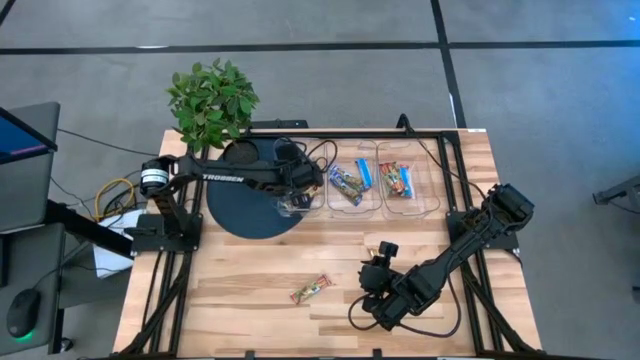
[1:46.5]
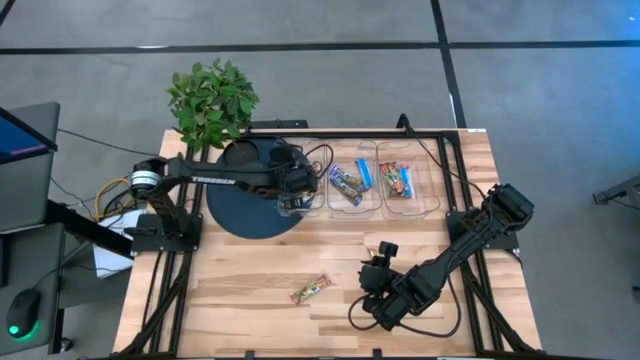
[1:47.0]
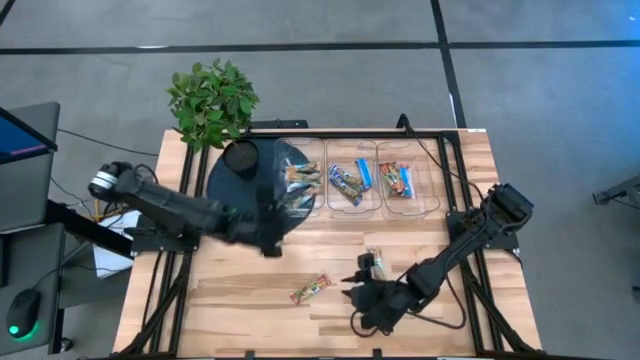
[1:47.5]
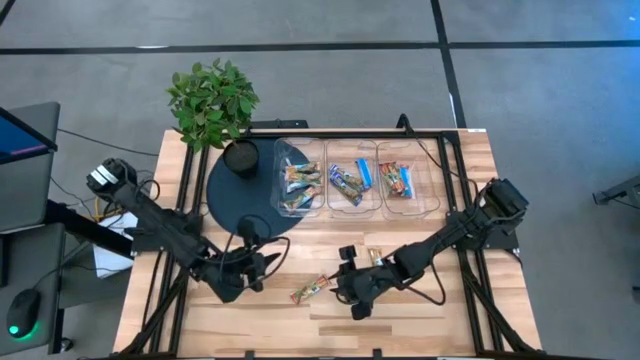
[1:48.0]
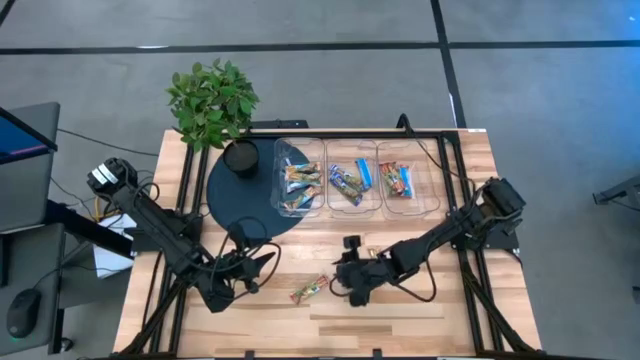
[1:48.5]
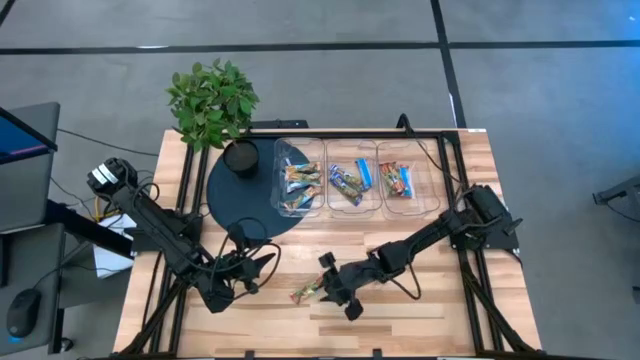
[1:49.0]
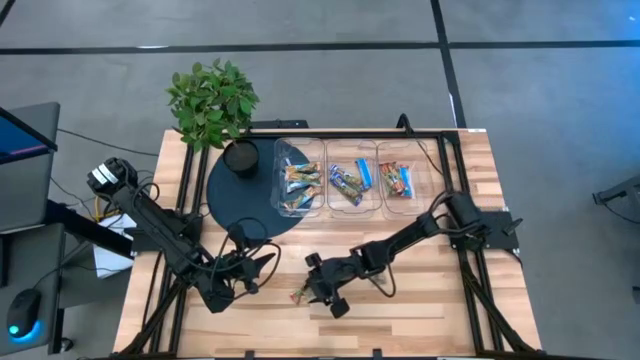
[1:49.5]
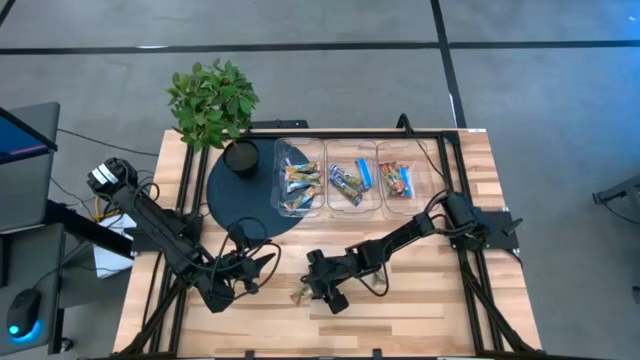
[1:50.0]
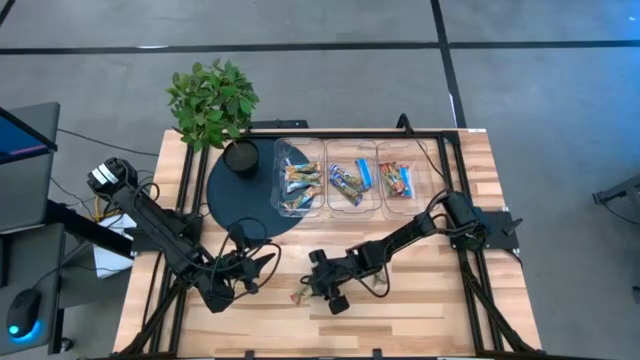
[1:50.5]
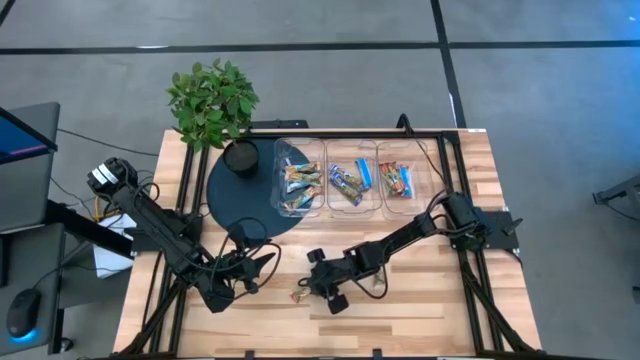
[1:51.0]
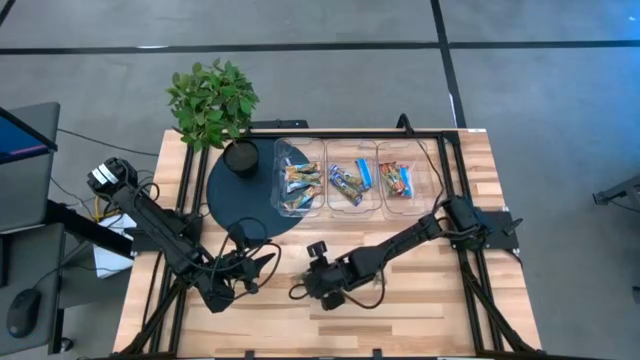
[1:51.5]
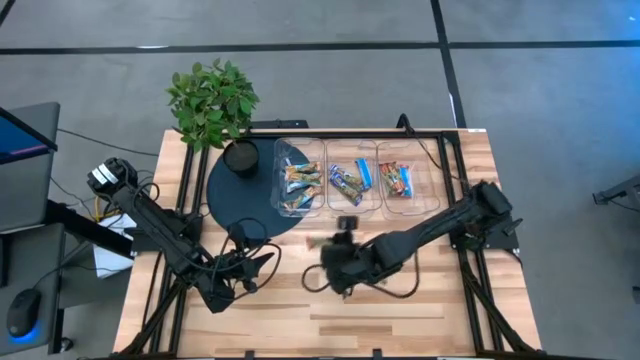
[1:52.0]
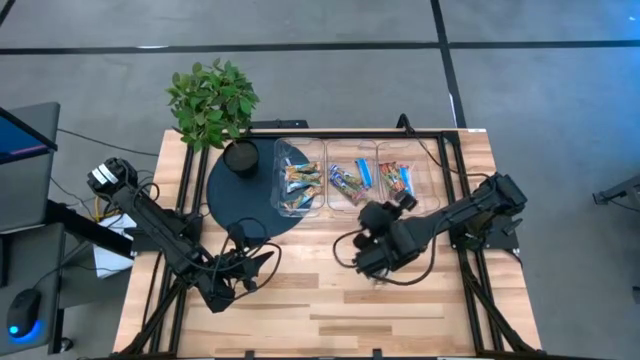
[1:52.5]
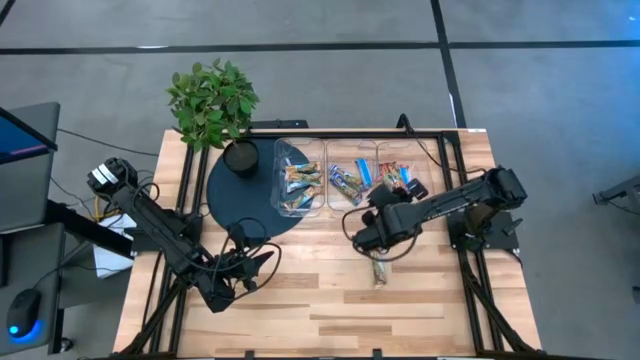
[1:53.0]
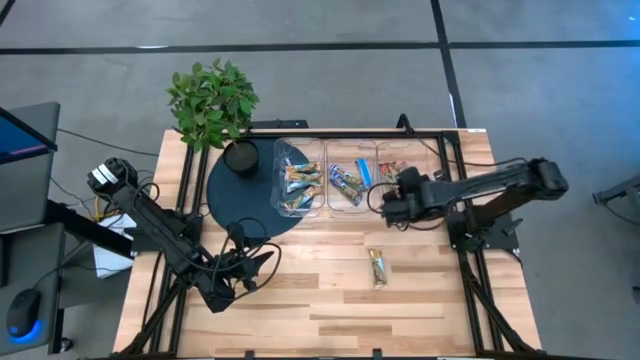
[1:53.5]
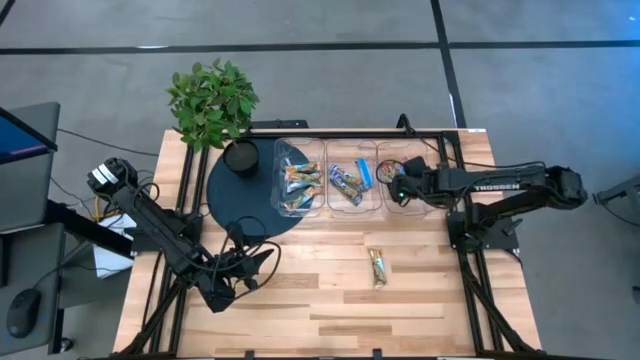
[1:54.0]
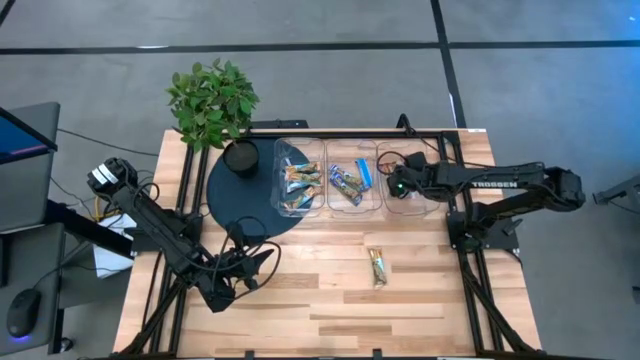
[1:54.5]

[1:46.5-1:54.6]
Task: Pick and place Granola Bars by type
Put the red granola bar into the right transparent bin

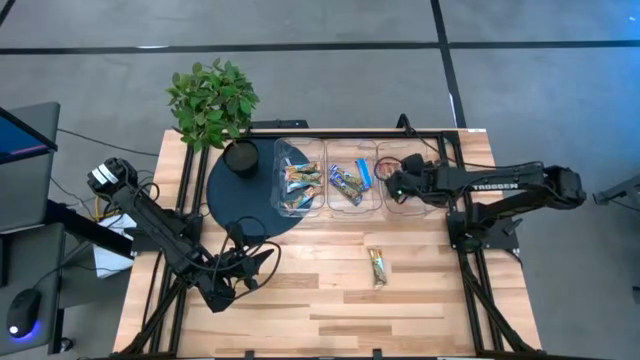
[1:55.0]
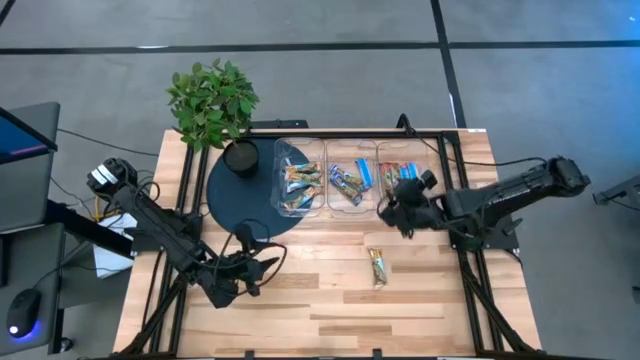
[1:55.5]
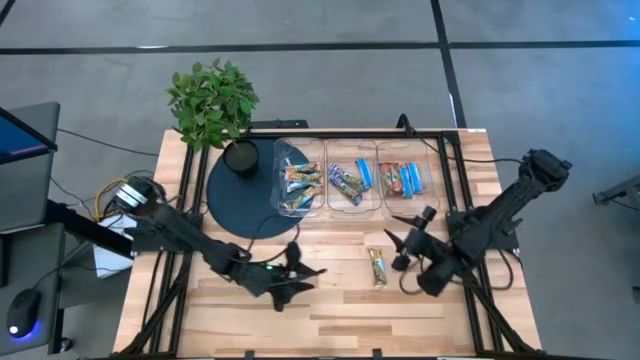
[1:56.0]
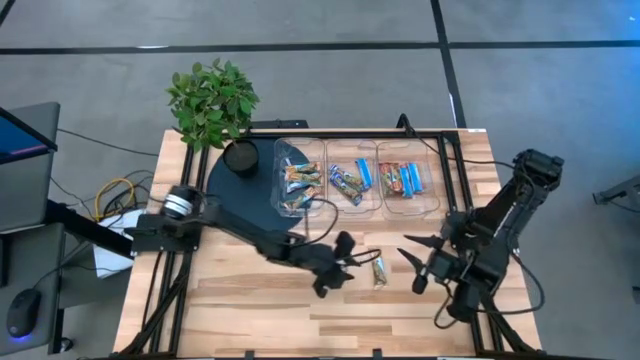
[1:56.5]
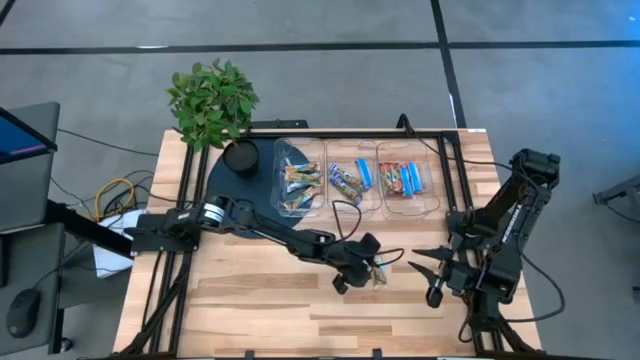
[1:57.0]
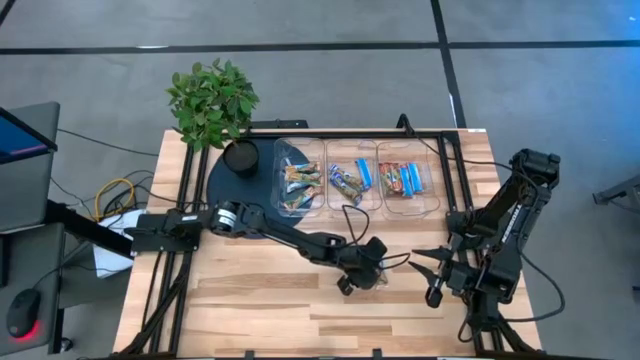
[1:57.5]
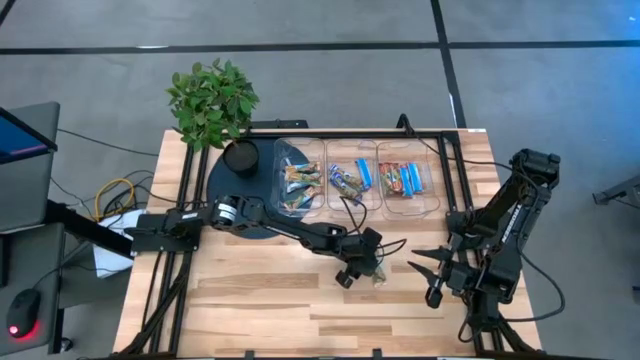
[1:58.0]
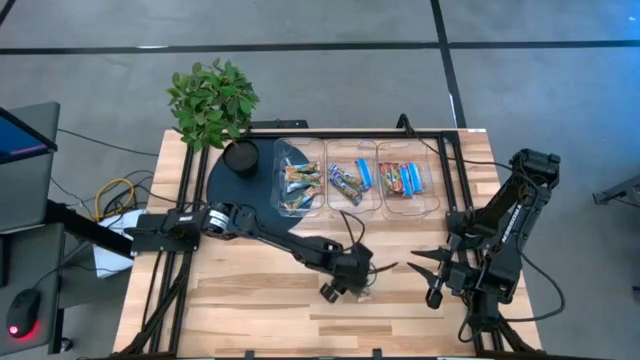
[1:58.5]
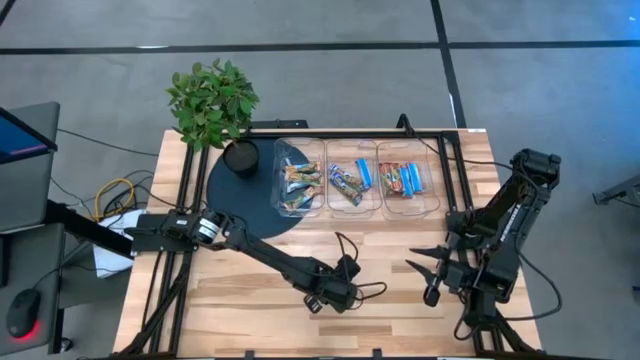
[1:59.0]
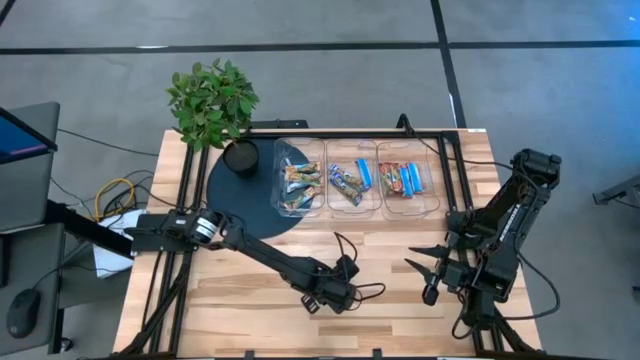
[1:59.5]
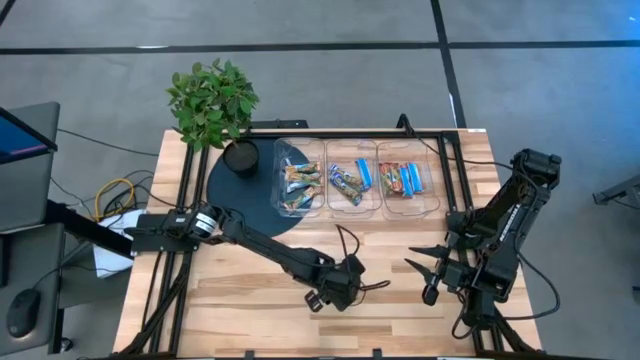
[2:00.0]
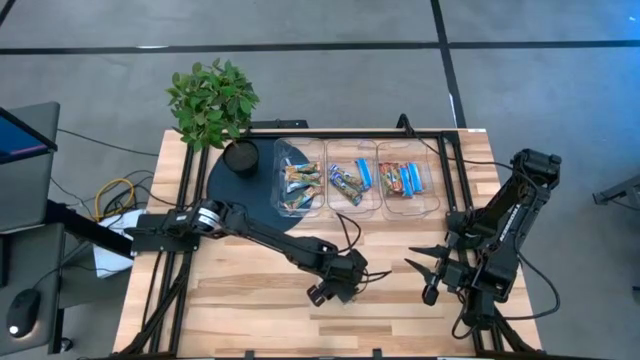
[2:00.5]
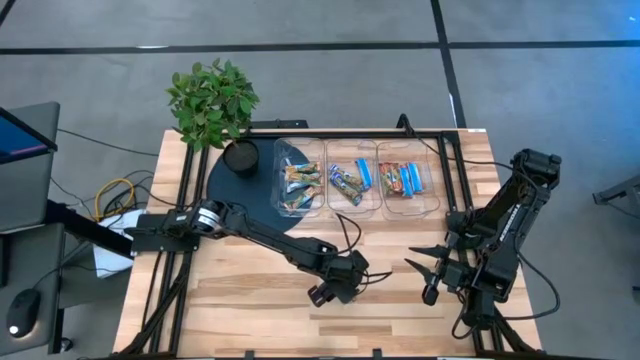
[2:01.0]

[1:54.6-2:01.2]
Put the yellow granola bar into the left transparent bin

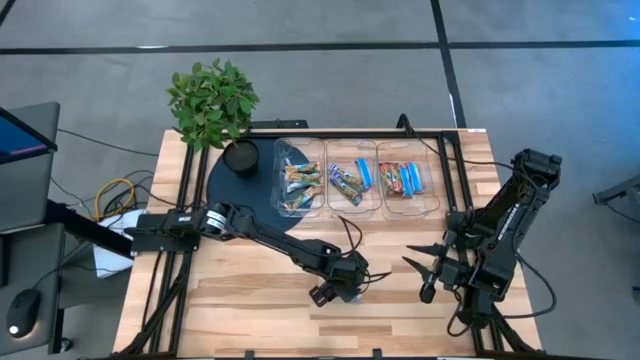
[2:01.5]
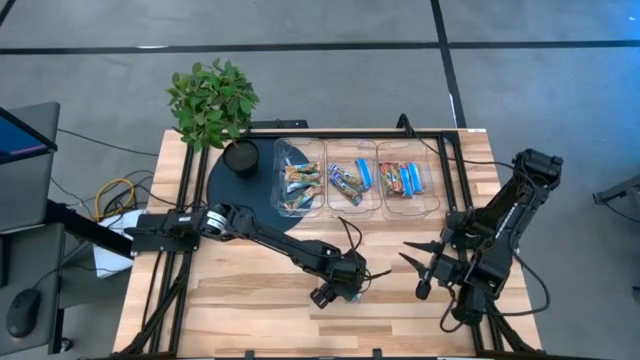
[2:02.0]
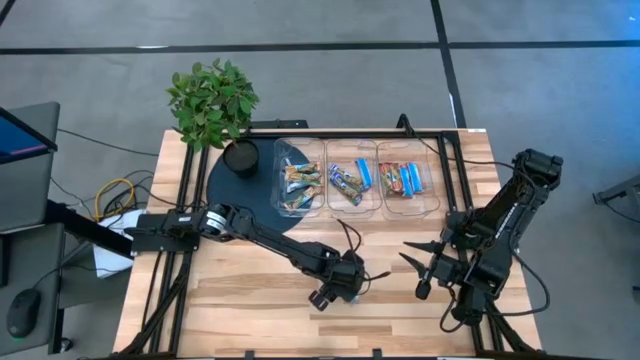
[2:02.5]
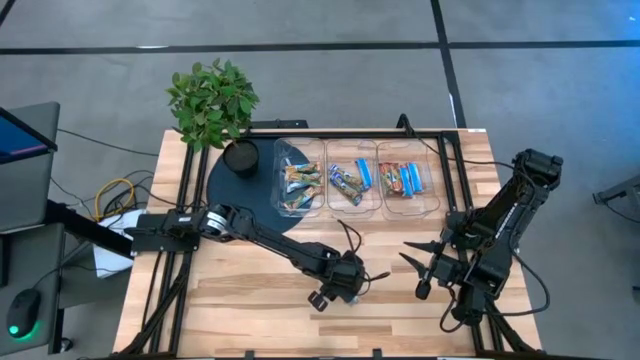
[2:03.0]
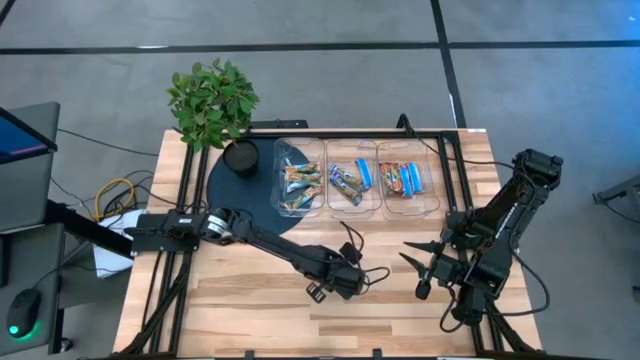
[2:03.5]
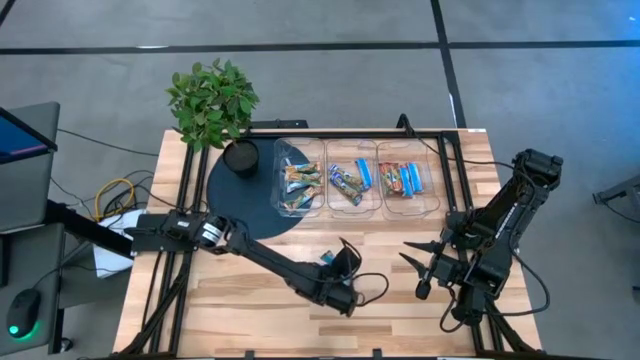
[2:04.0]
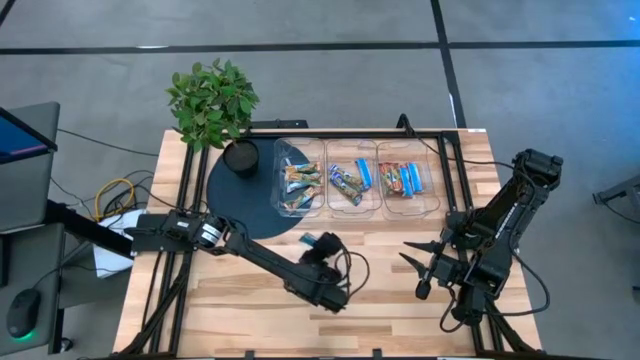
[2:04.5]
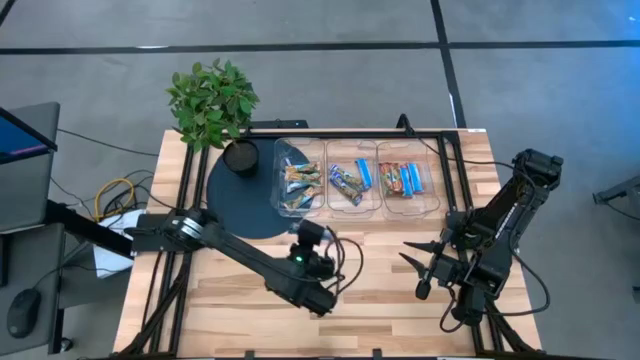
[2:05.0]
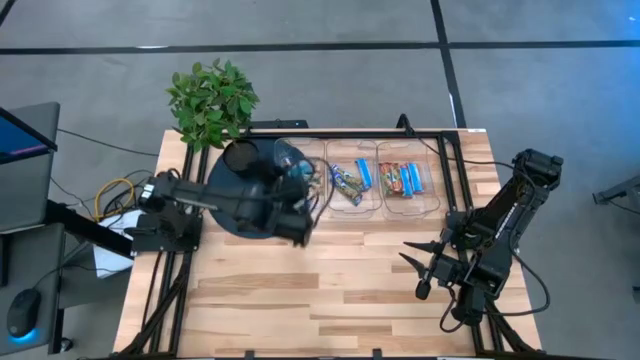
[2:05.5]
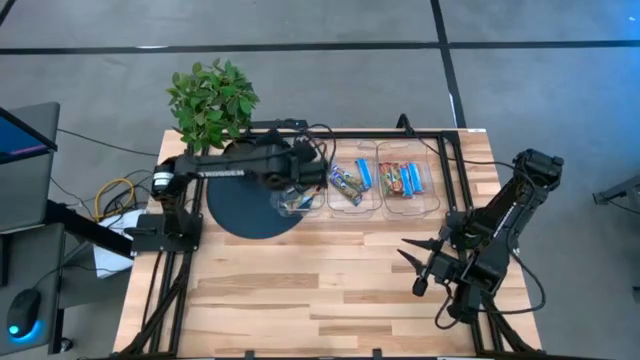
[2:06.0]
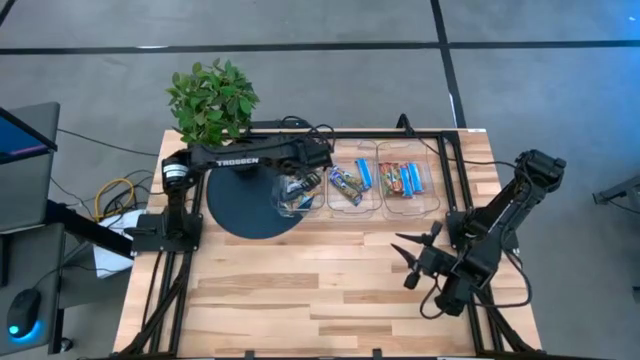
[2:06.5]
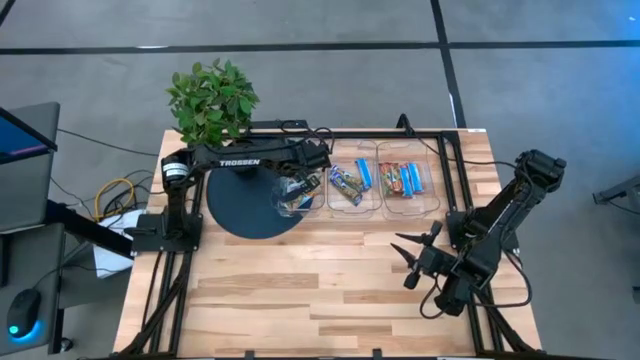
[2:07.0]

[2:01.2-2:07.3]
Put the yellow granola bar into the left transparent bin

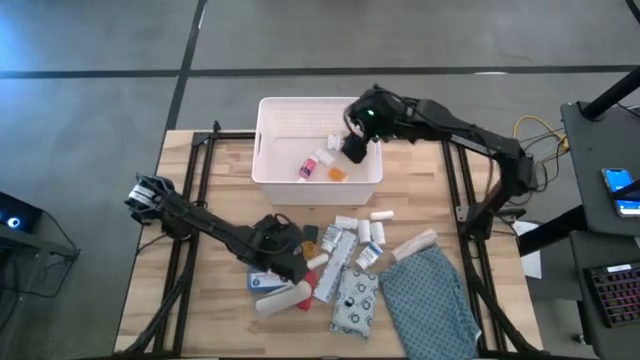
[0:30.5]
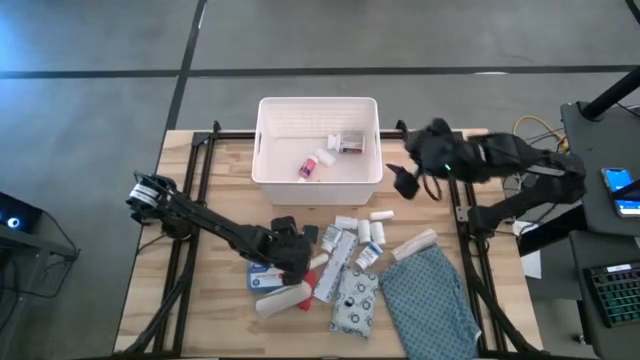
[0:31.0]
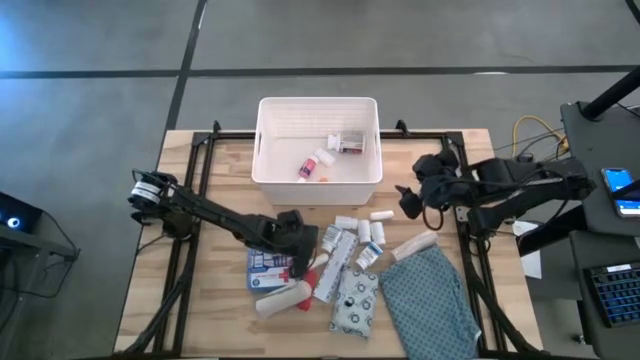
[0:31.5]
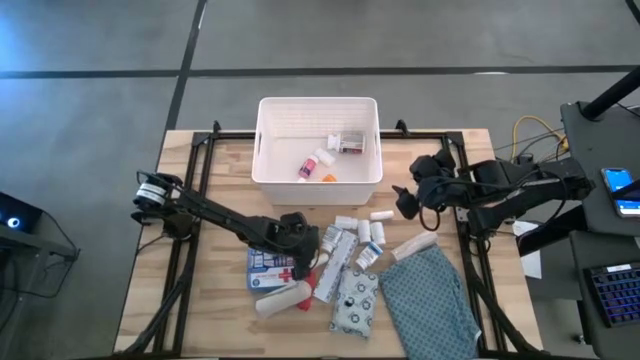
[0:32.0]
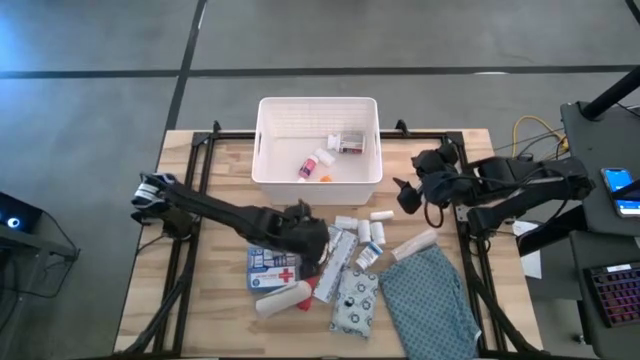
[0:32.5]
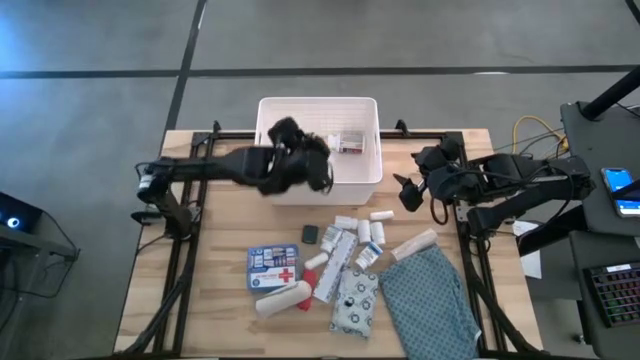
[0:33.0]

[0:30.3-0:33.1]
Task: Pick & place medical supplies in basket/bin
Put the orange bottle into the white bin
